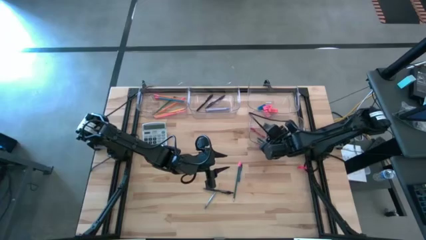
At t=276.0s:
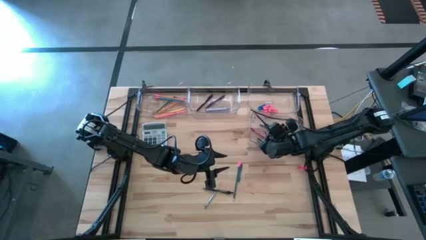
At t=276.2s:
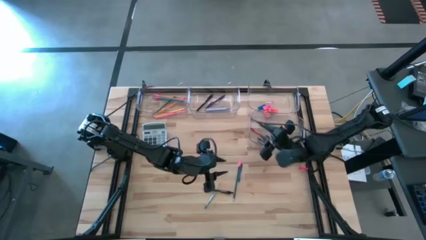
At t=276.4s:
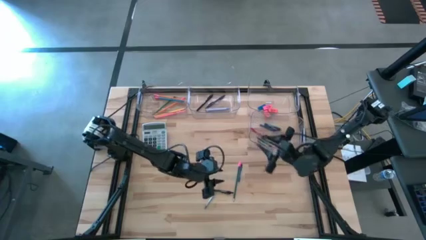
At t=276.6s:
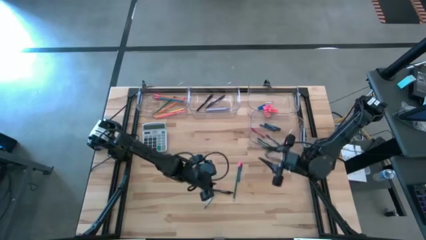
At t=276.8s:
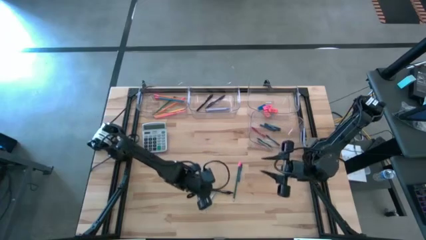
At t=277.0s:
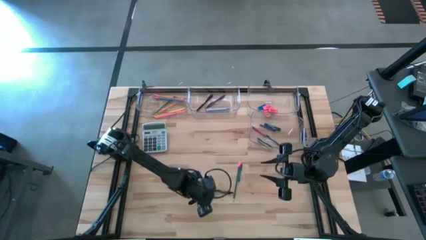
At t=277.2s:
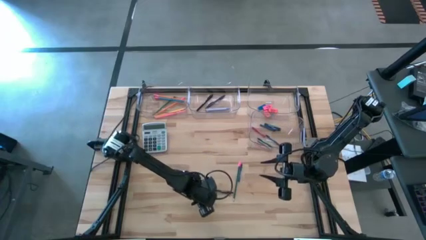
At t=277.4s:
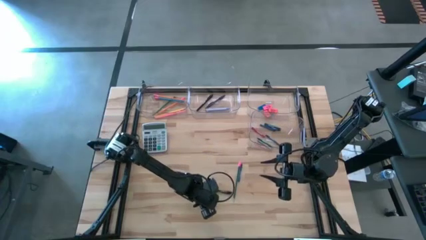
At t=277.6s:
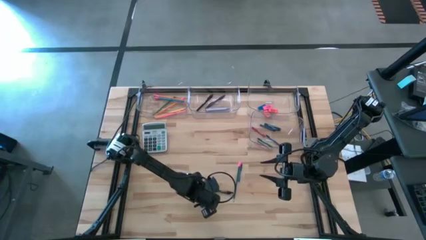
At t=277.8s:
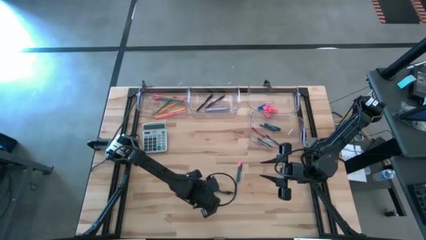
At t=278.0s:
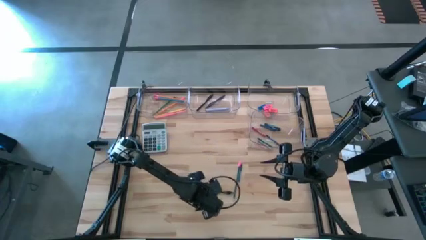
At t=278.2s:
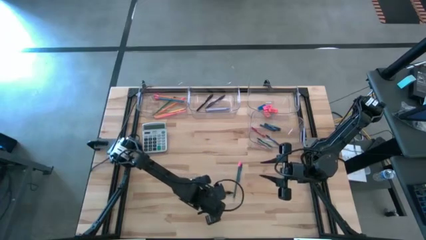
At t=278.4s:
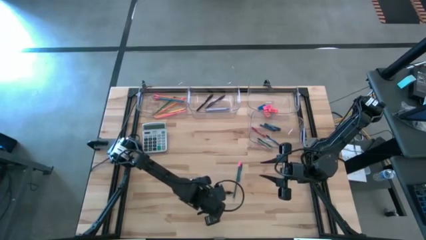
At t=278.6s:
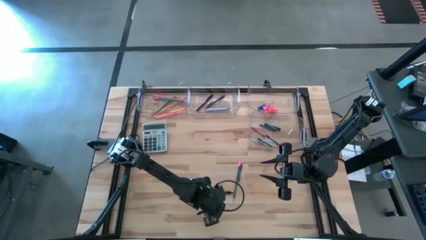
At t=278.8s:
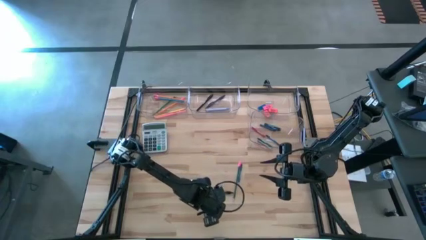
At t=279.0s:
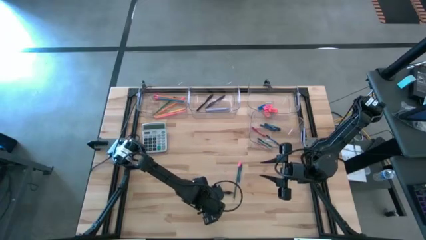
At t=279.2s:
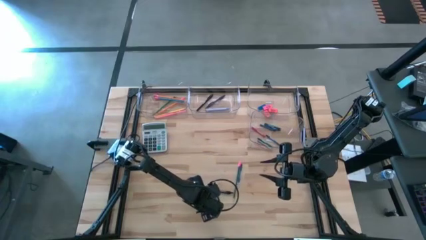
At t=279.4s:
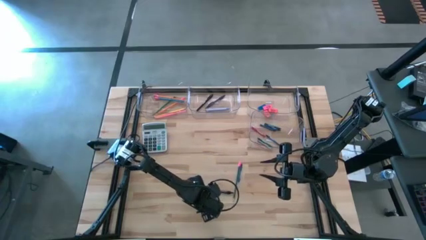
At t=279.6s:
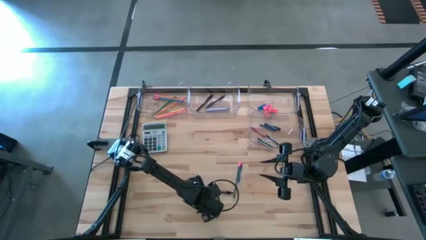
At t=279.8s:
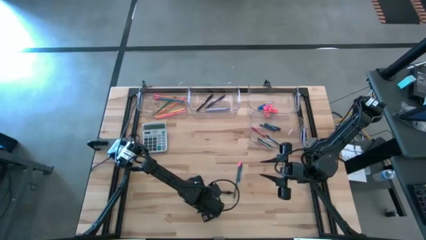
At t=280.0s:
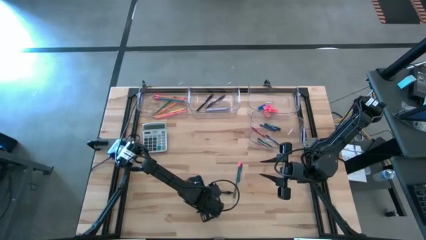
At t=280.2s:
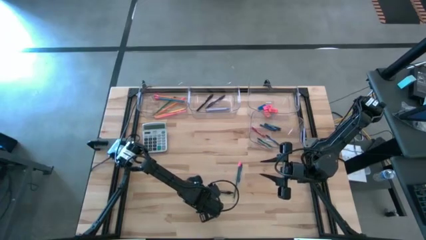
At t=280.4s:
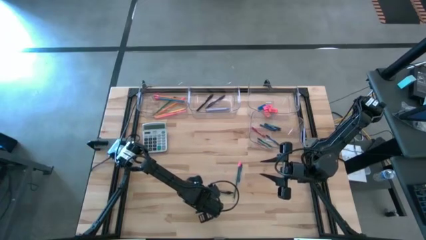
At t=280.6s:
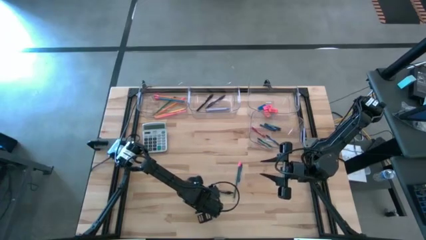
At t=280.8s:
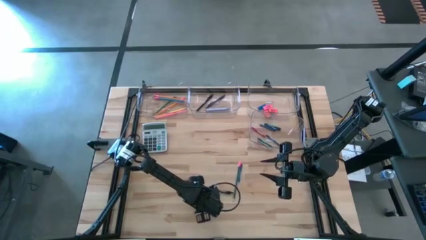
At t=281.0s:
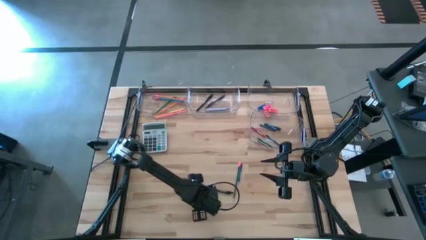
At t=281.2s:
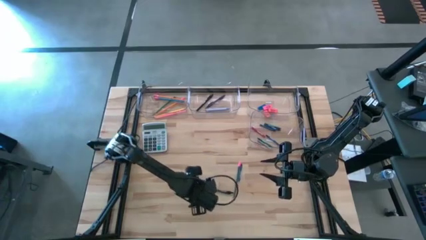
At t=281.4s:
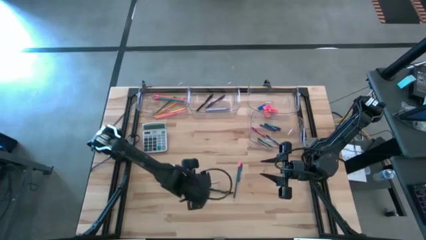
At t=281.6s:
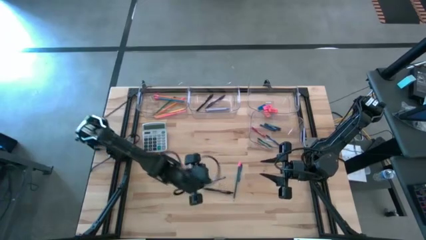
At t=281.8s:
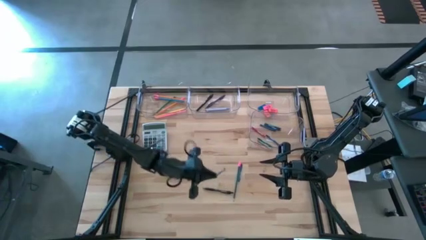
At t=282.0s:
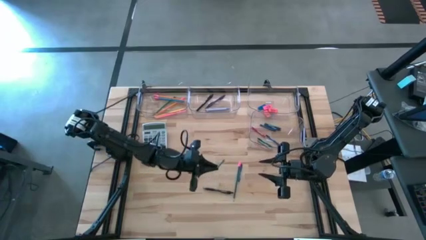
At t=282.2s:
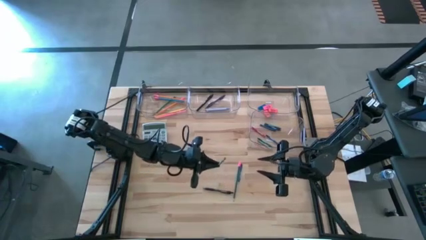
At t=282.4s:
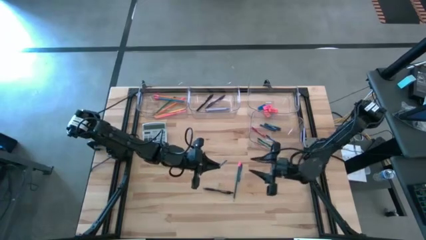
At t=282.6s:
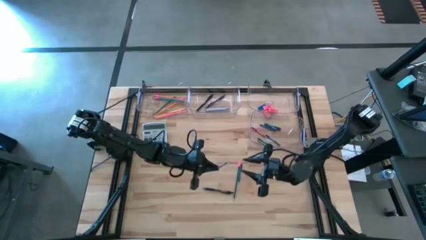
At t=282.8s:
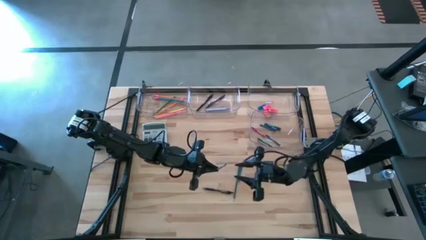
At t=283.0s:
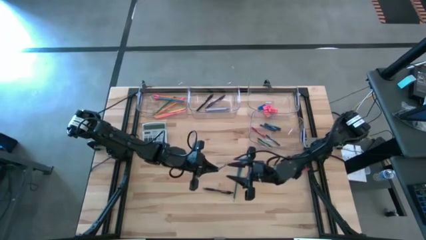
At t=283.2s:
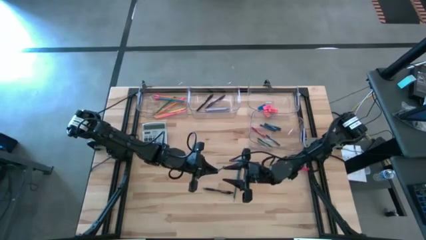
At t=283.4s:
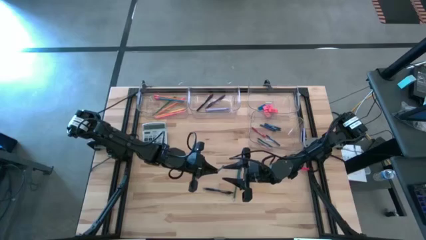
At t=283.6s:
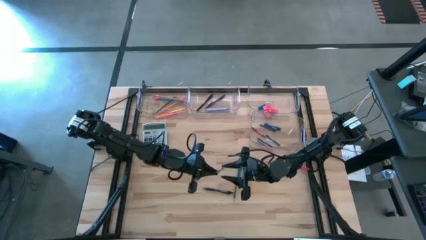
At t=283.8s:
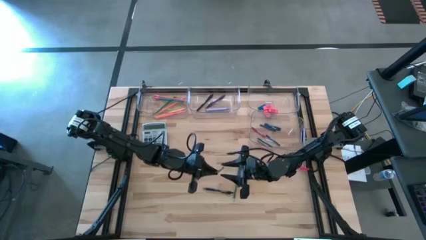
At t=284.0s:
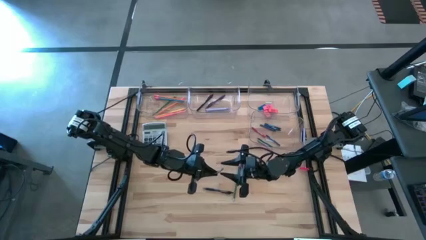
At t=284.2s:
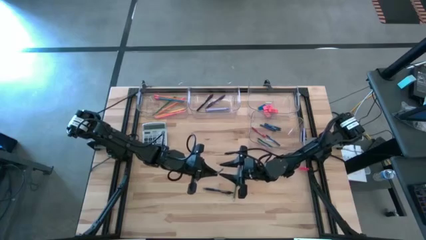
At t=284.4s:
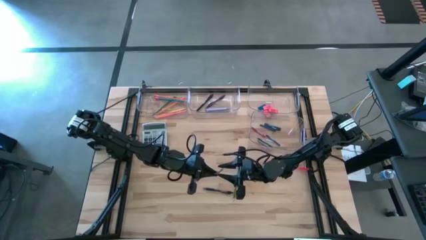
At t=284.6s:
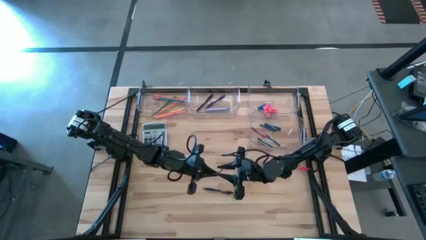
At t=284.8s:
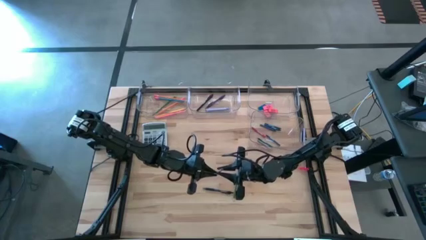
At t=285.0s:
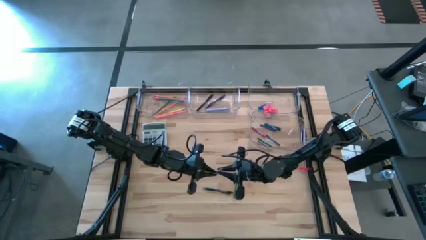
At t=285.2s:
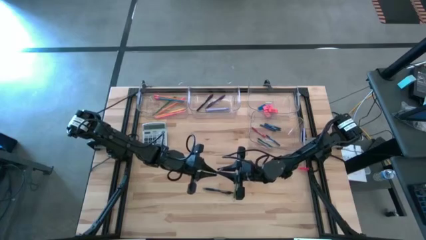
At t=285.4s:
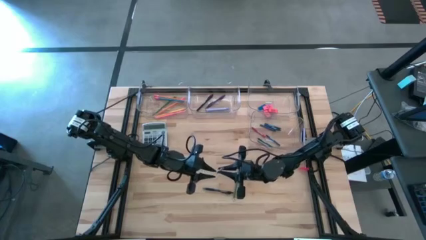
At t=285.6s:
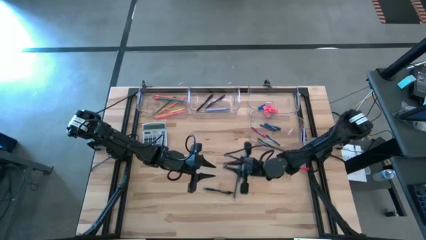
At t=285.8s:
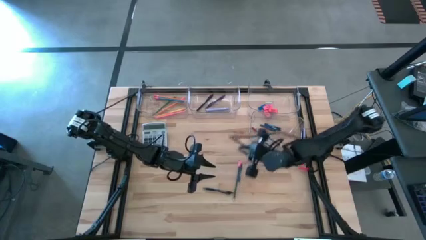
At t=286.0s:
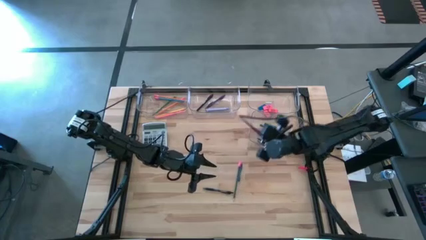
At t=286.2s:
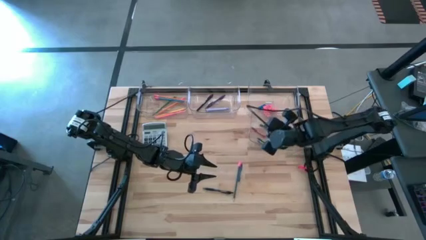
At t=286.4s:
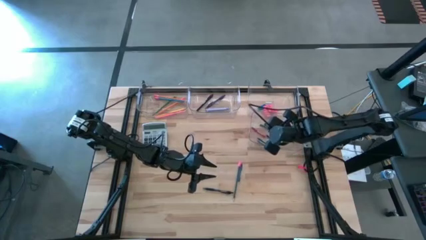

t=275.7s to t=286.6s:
Task: Sort crayons/erasers/pens/pencils in bins
Put the gray crayon into the bottom transparent bin

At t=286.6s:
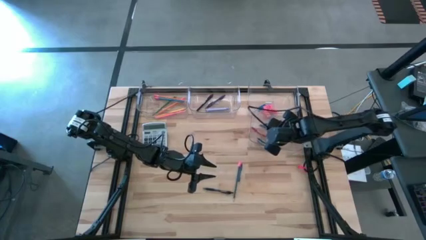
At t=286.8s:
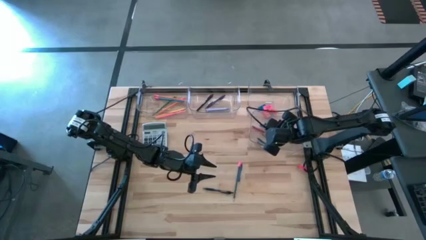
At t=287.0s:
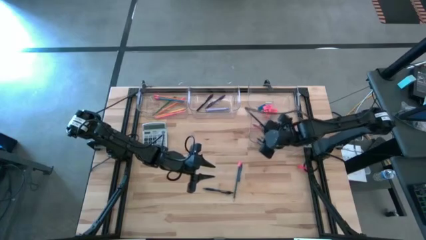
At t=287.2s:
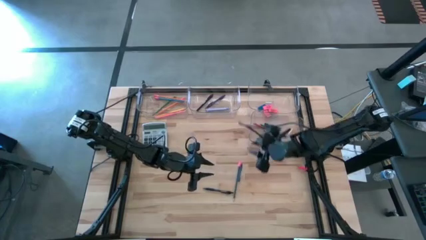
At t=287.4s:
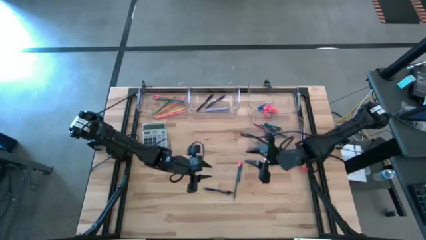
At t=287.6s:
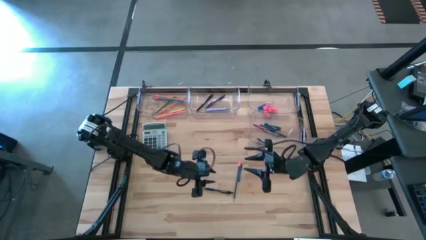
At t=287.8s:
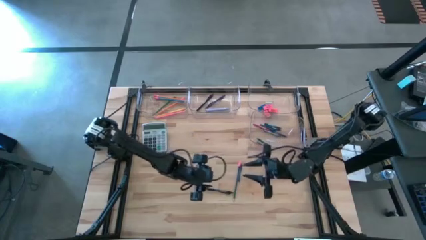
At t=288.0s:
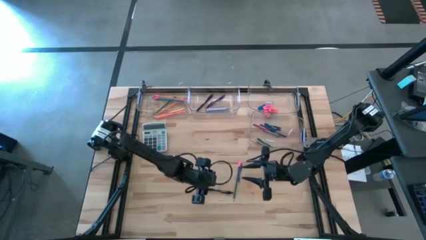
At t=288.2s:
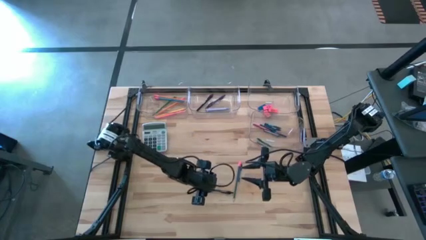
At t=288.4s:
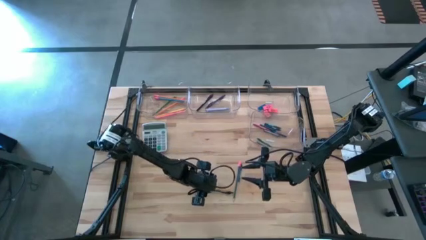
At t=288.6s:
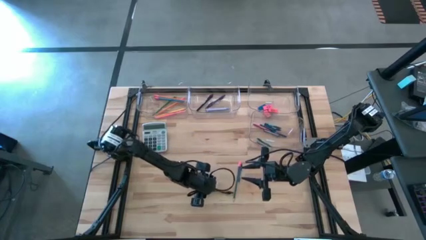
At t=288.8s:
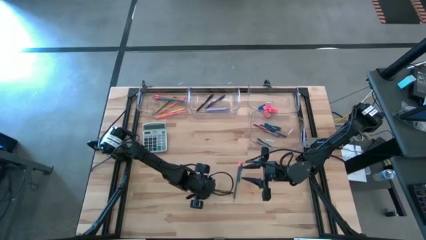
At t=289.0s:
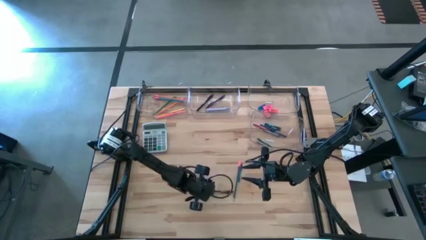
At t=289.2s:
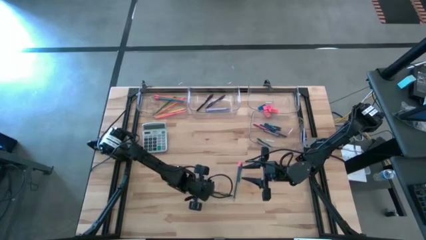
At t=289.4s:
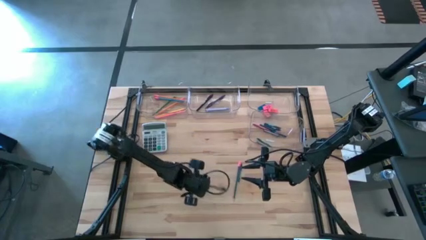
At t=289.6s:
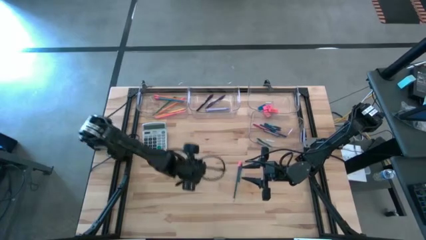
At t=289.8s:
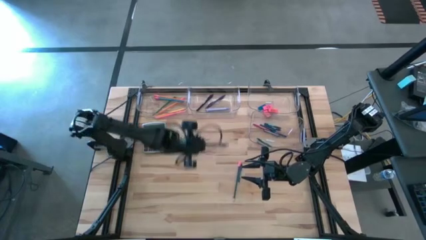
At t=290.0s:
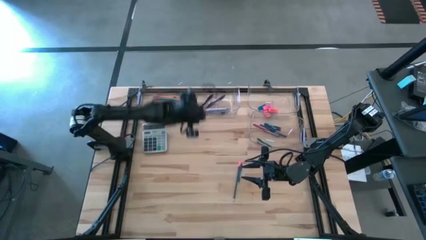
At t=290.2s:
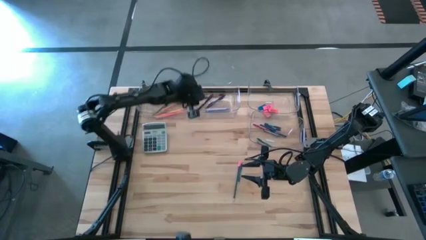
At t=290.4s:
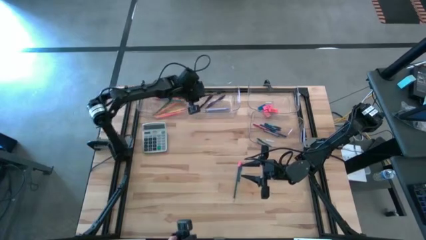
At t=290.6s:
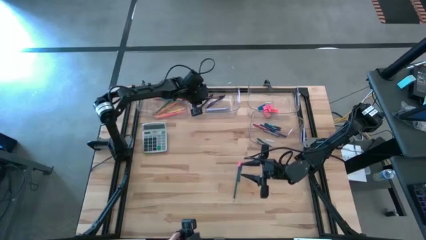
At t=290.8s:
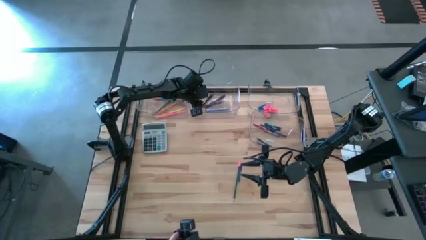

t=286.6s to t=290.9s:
Put the black pen into the top middle transparent bin

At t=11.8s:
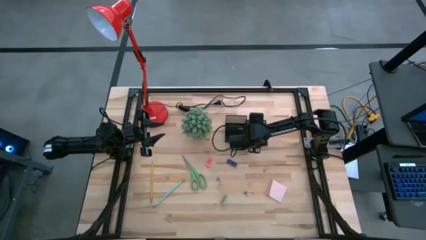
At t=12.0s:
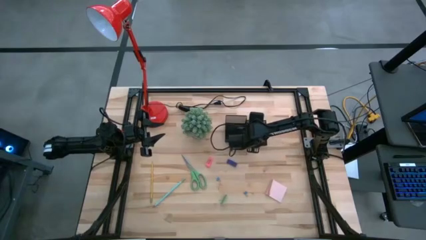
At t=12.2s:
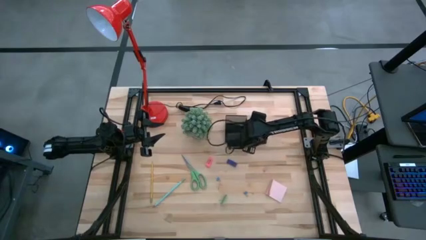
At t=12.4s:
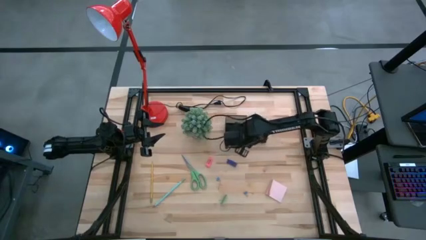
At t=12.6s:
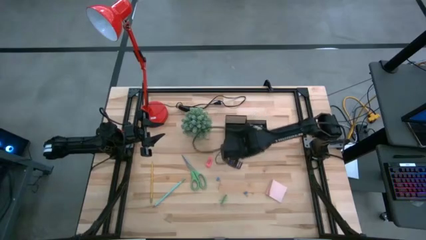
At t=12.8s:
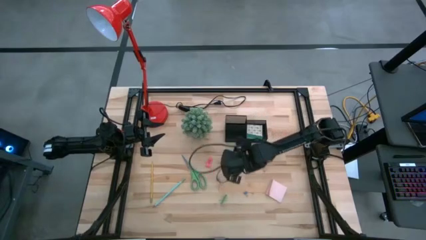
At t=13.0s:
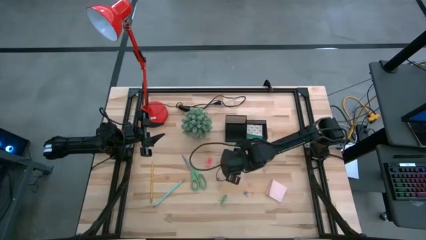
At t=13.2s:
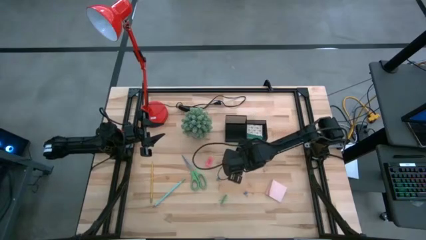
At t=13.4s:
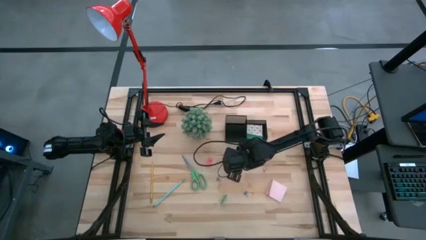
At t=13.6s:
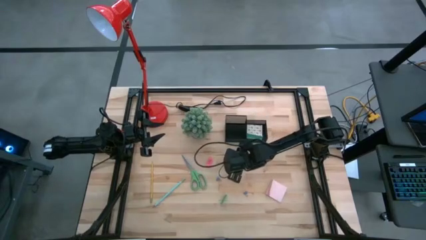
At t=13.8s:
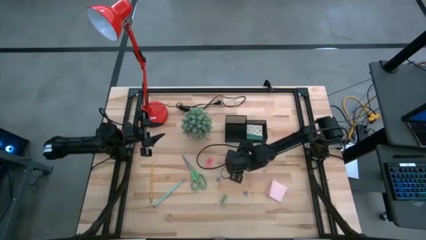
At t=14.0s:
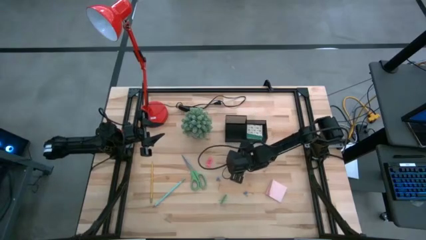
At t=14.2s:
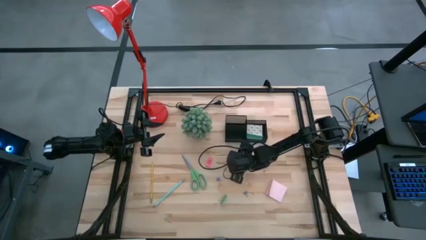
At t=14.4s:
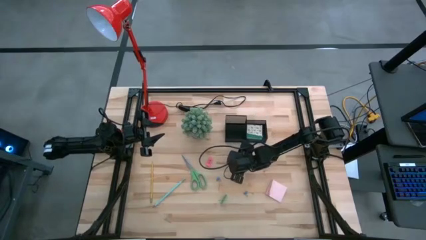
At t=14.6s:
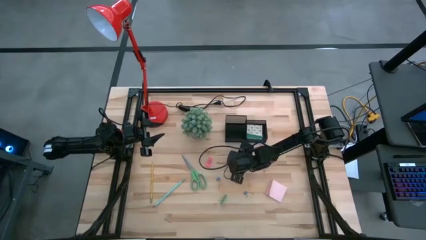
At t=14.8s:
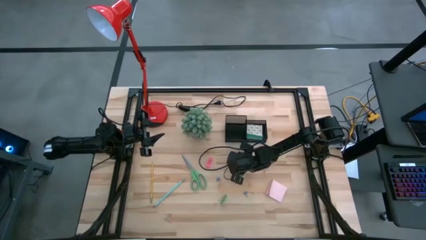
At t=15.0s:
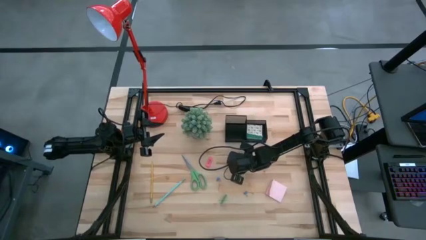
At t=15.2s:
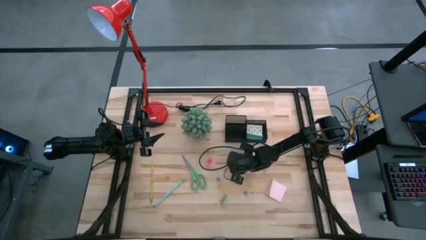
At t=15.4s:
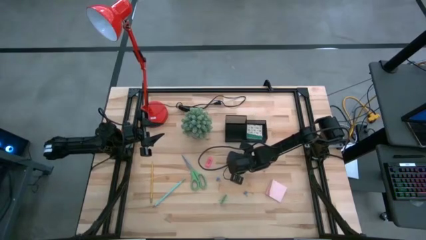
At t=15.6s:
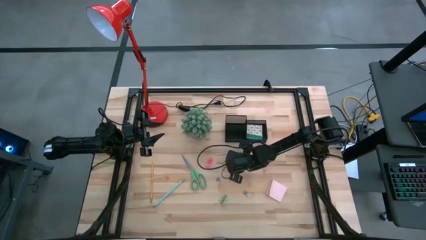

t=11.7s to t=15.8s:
Task: Pick and place office supplies into organizer
Put the blue eraser into the black desk organizer
